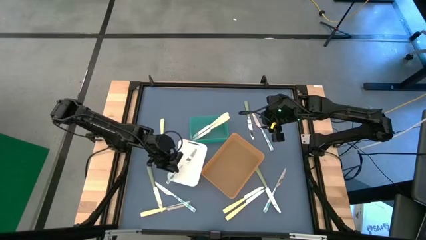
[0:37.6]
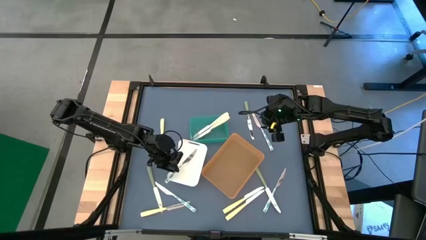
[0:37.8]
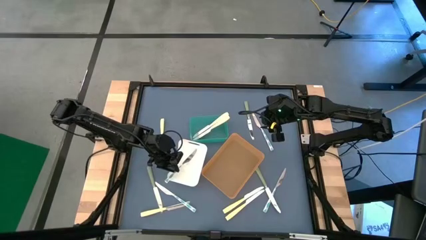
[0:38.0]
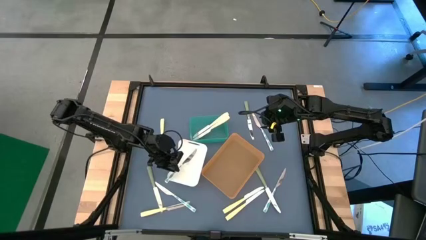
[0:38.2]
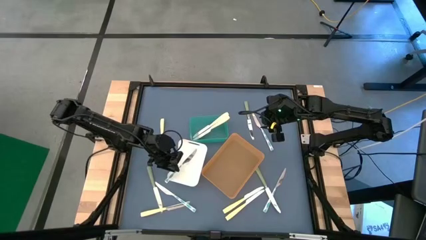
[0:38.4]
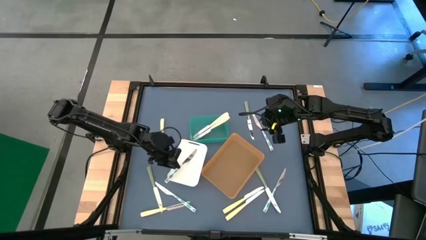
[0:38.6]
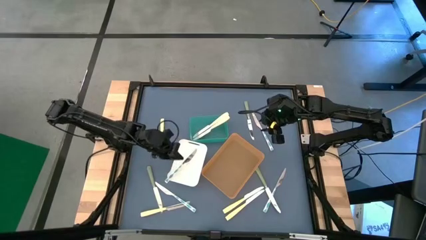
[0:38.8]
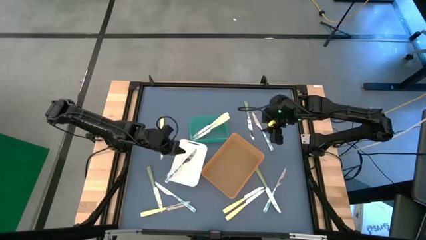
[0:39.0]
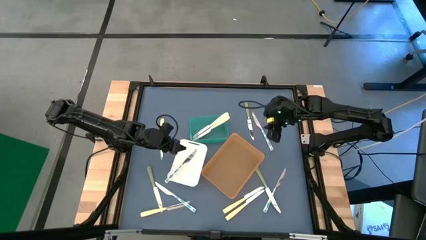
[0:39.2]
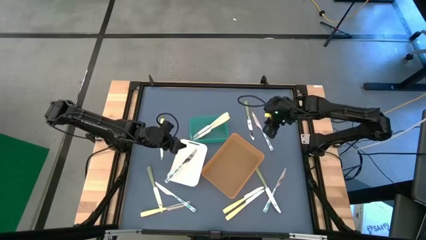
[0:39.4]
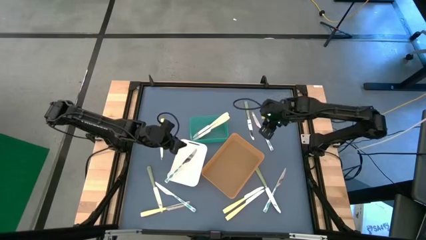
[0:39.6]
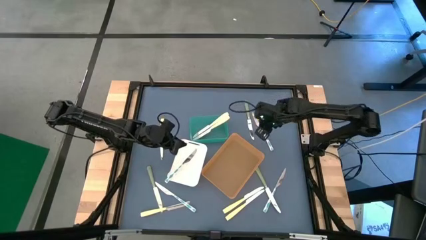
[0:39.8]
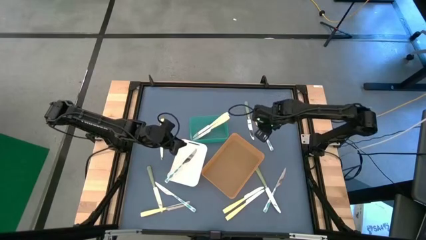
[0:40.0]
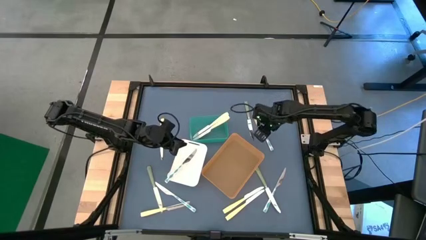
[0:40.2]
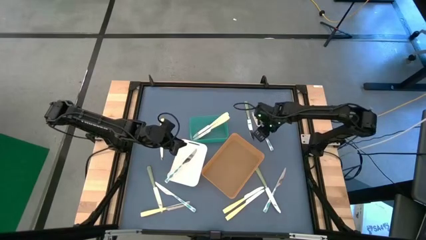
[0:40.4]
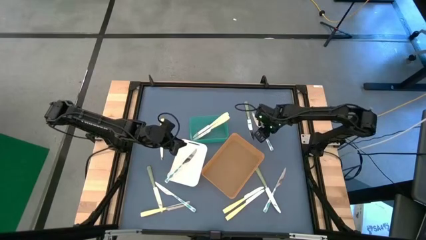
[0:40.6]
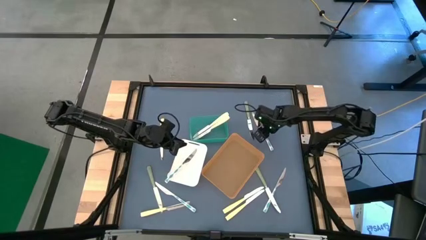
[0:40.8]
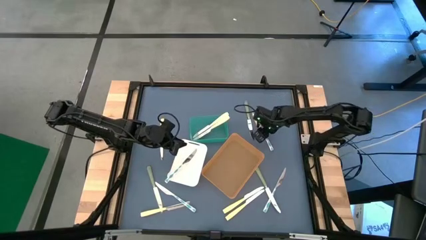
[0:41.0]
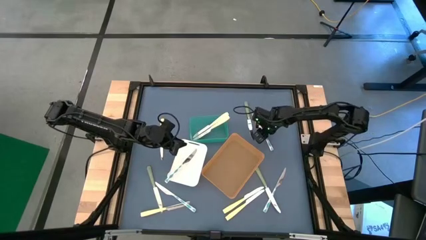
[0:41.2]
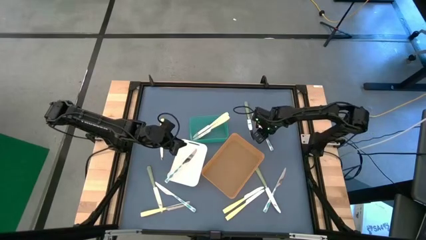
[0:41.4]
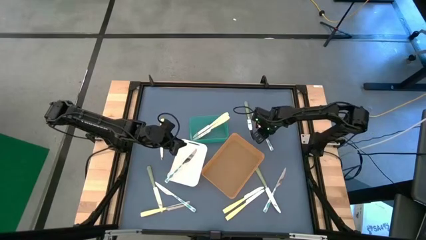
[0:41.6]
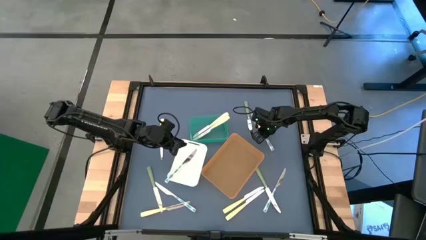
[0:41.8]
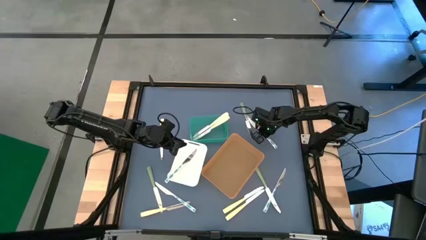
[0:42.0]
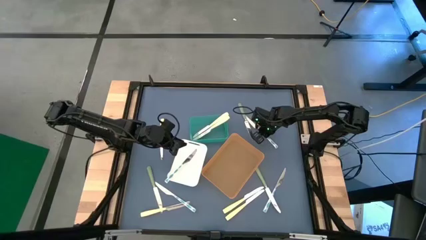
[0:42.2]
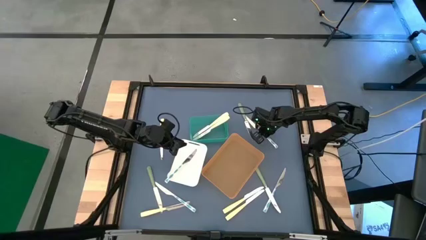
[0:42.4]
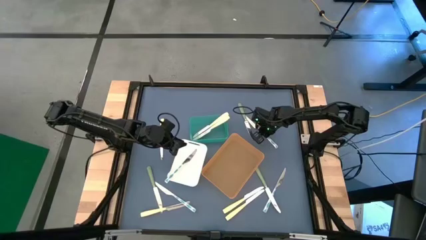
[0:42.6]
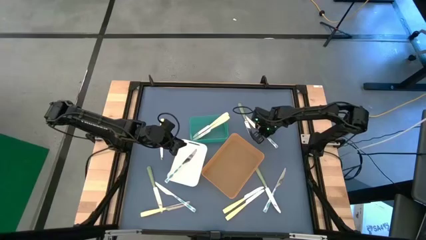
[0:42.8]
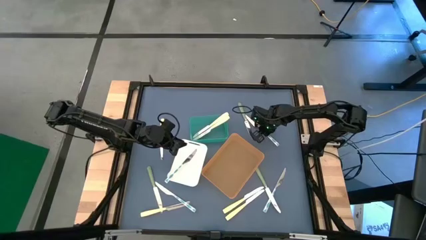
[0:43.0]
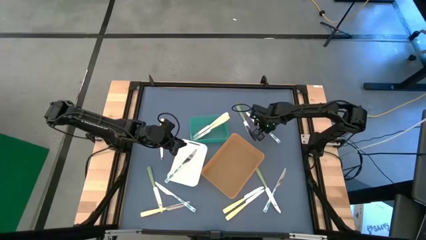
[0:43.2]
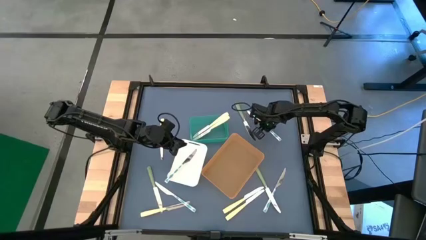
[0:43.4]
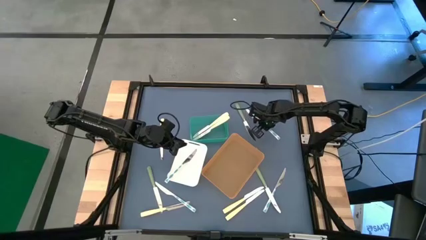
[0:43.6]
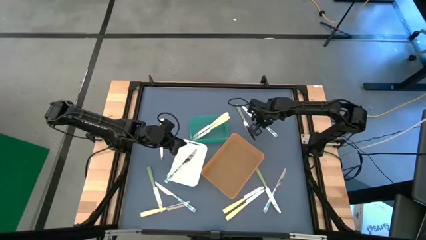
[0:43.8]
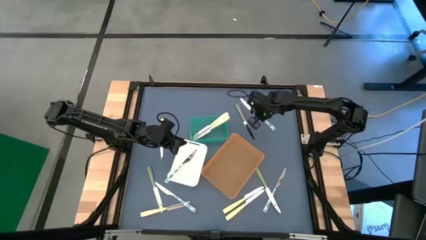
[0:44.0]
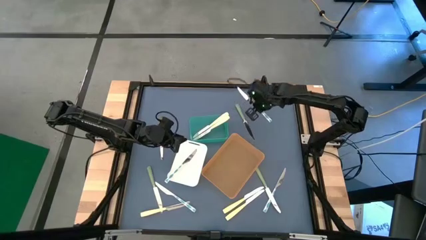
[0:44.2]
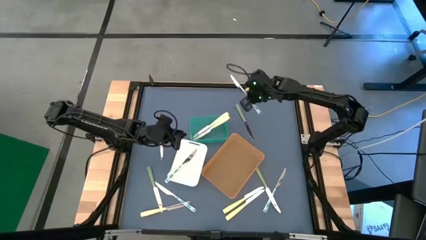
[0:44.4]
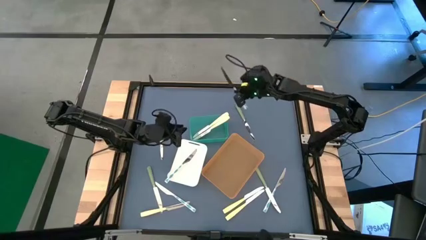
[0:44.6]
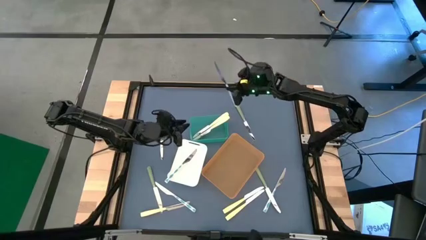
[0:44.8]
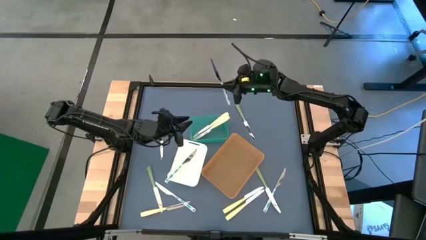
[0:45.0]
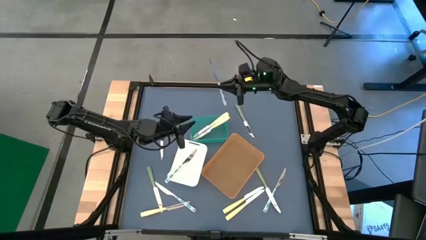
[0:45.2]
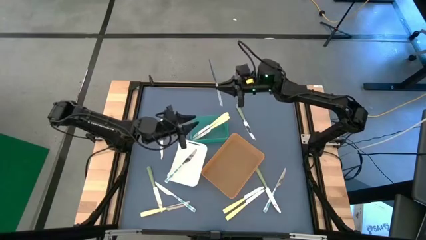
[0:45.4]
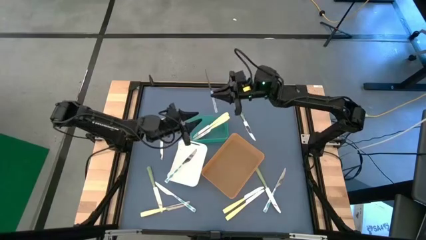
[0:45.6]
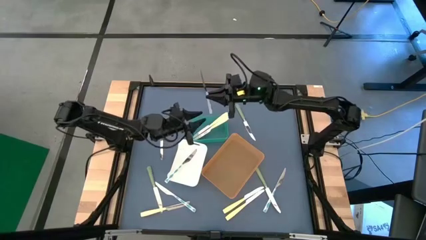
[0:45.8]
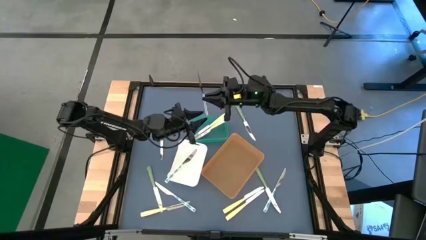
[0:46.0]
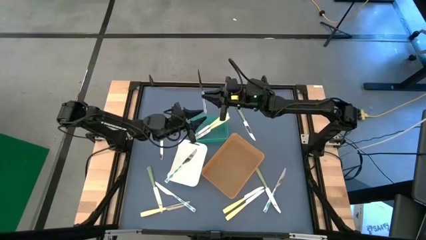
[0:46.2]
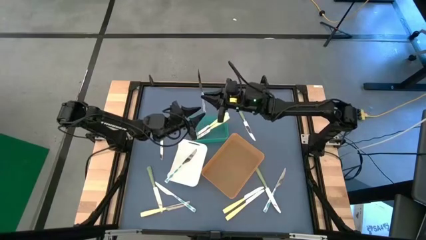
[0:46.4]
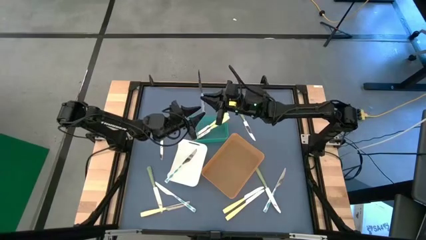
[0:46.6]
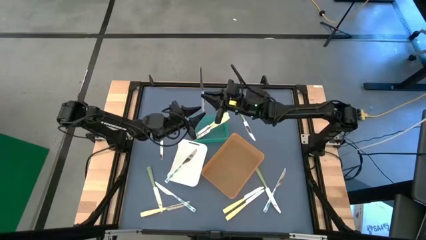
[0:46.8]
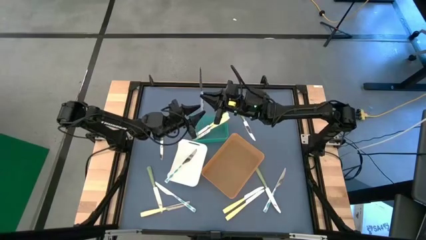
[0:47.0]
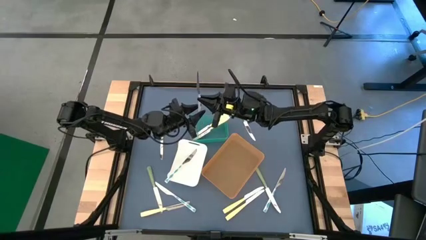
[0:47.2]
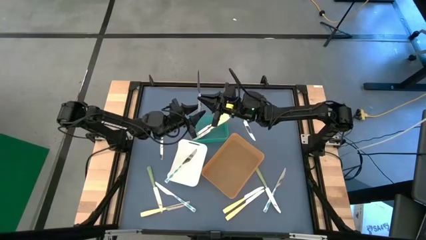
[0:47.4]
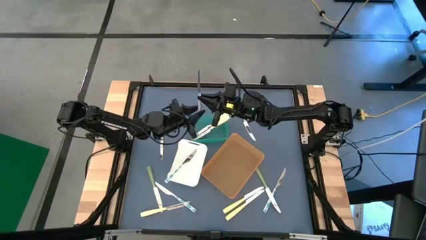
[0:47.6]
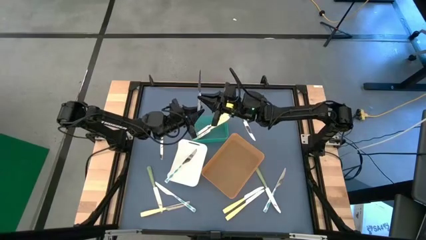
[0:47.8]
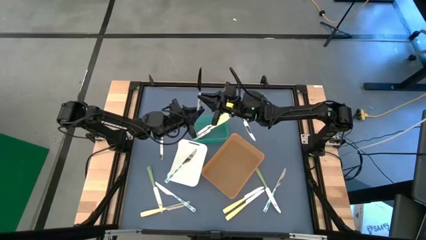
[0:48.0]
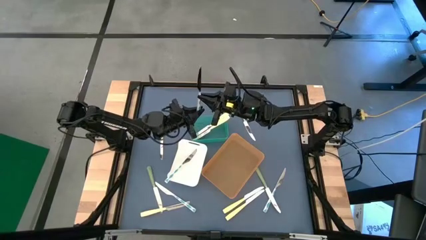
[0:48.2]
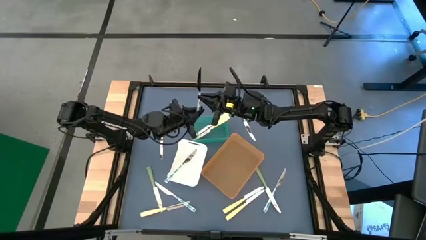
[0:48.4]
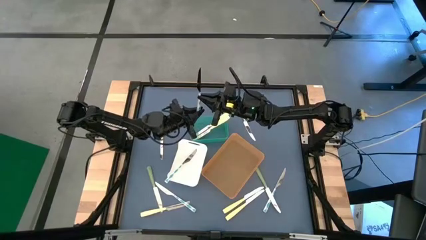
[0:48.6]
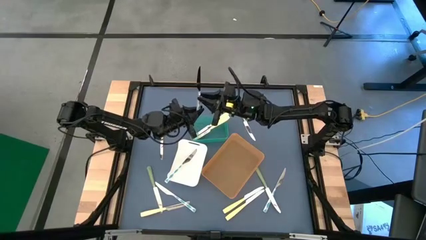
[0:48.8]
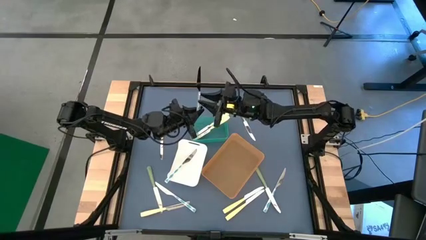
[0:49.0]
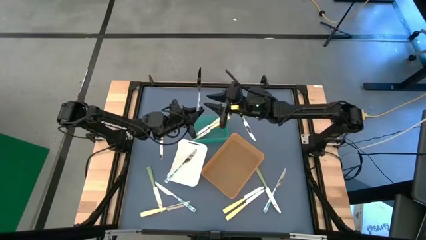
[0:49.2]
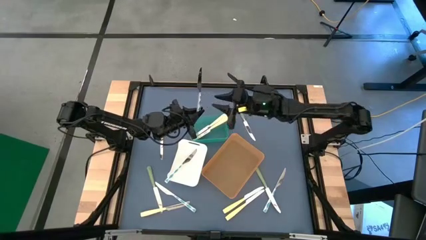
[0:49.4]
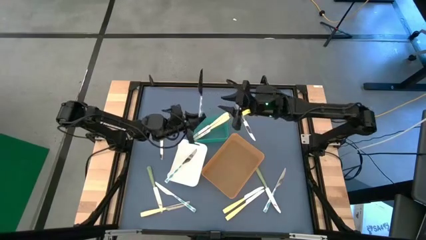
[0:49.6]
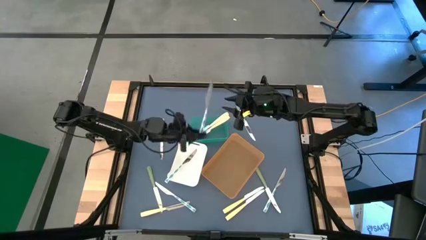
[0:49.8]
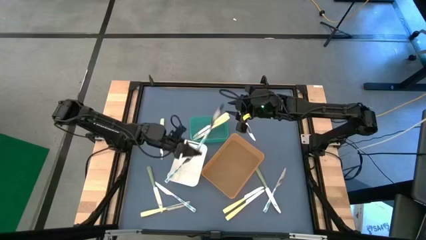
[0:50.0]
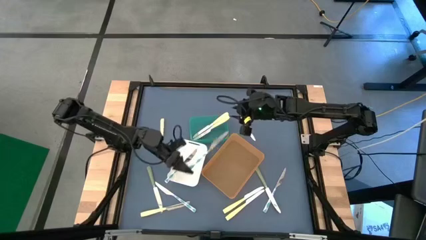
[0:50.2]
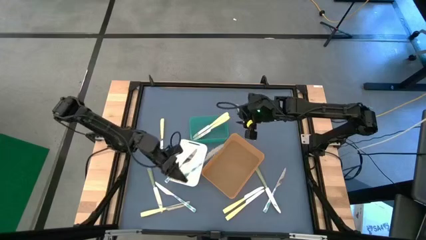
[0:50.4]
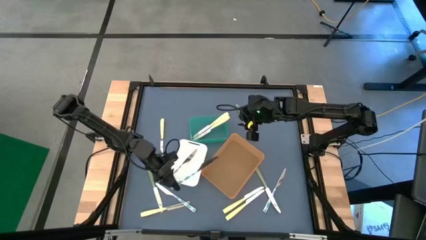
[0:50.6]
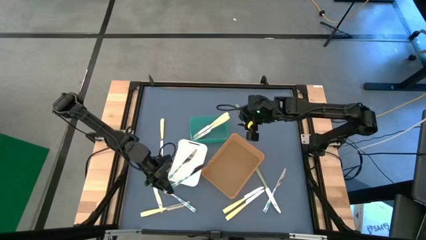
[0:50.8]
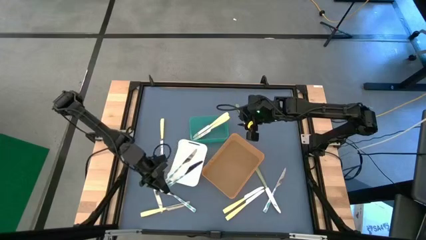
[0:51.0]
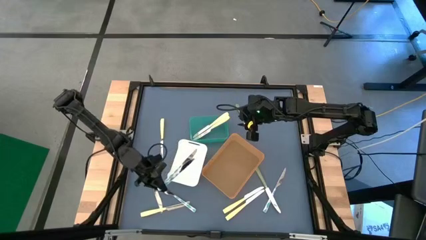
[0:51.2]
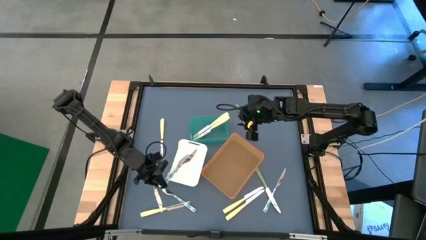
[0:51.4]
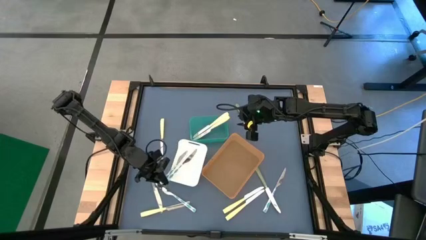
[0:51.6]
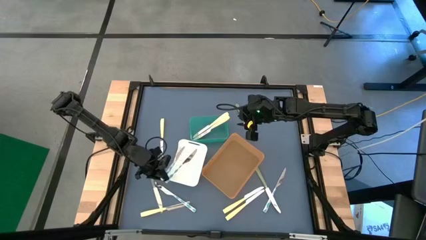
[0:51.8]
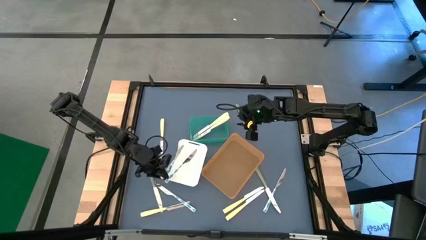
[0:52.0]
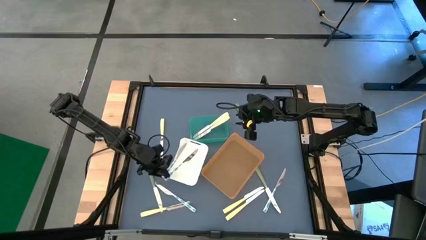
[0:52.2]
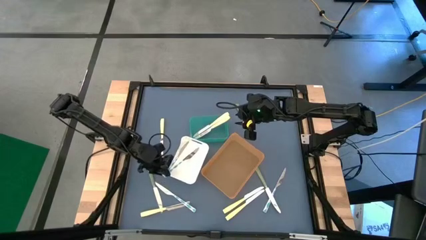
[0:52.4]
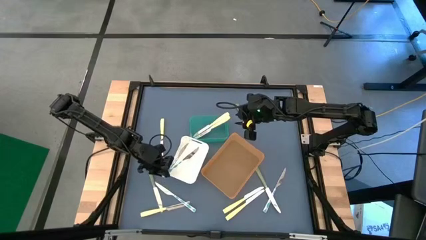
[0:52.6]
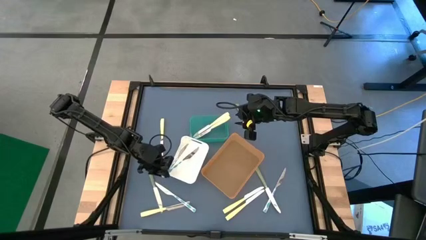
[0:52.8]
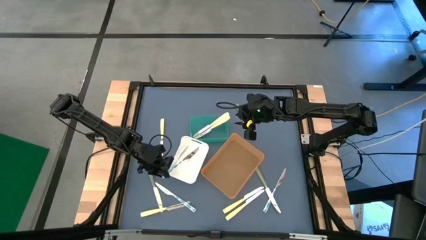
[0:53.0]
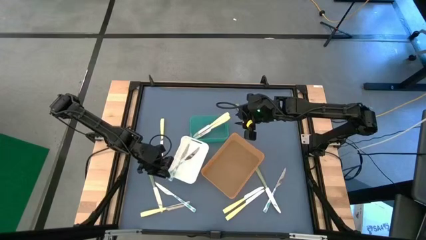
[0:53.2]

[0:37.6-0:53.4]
Task: Sort silverware by color (type)
Put the blue patterned knife into the white bin
